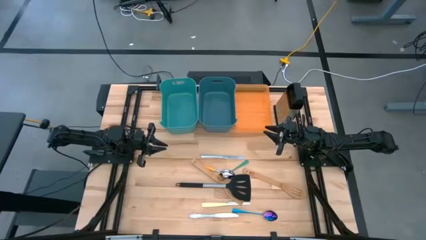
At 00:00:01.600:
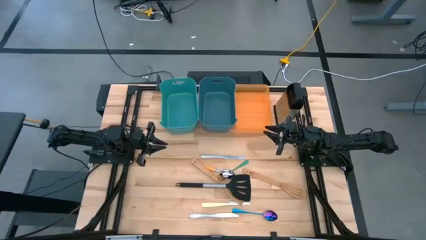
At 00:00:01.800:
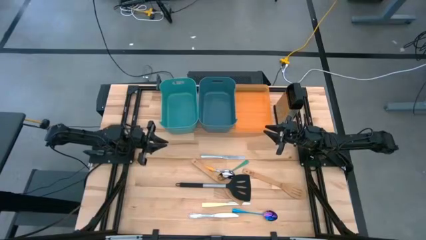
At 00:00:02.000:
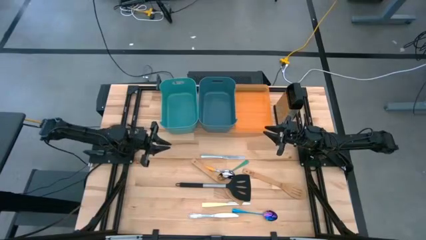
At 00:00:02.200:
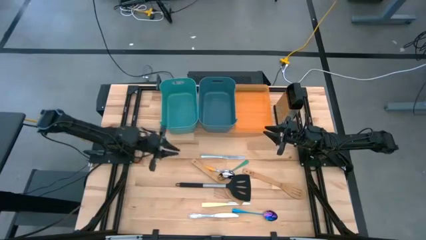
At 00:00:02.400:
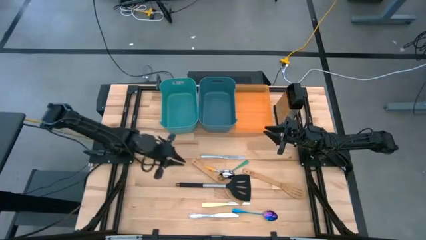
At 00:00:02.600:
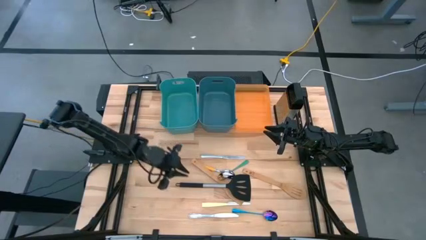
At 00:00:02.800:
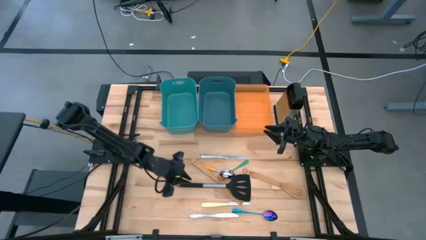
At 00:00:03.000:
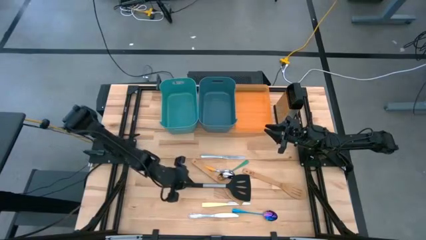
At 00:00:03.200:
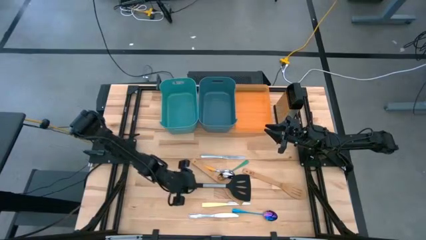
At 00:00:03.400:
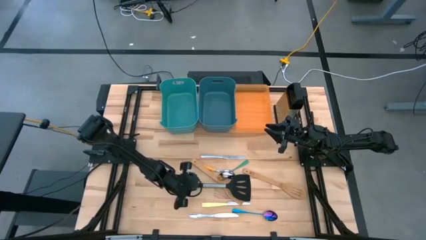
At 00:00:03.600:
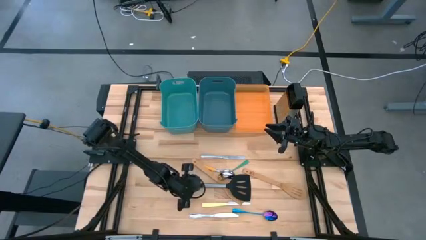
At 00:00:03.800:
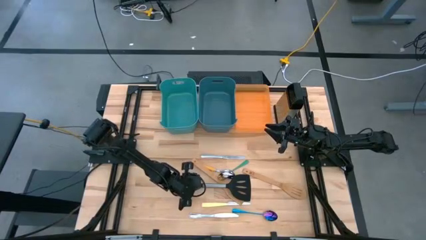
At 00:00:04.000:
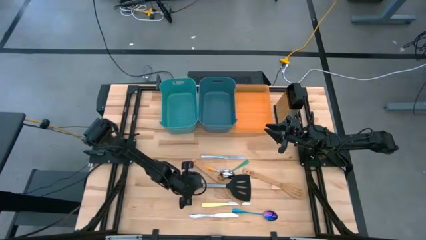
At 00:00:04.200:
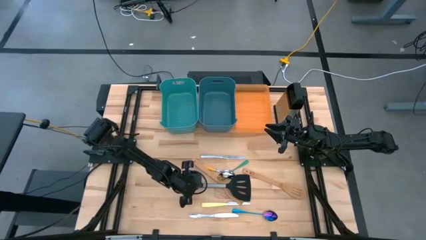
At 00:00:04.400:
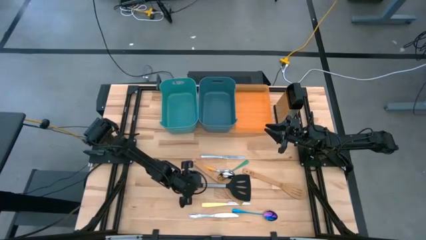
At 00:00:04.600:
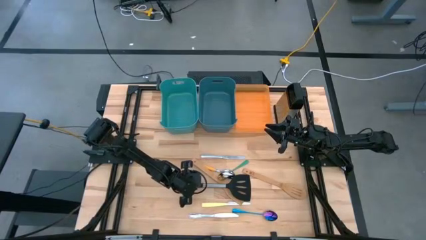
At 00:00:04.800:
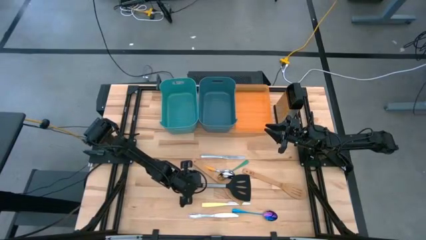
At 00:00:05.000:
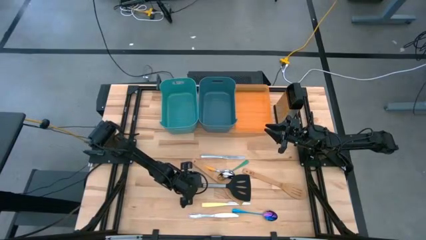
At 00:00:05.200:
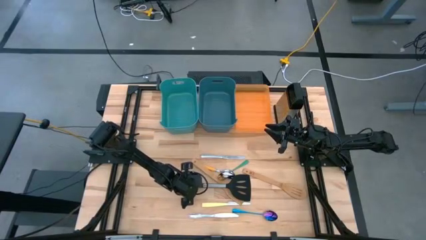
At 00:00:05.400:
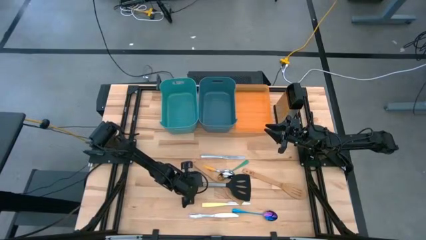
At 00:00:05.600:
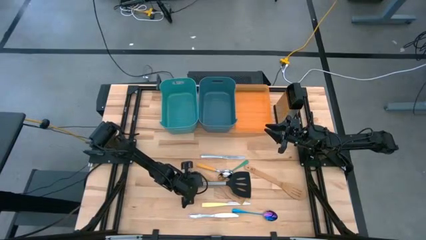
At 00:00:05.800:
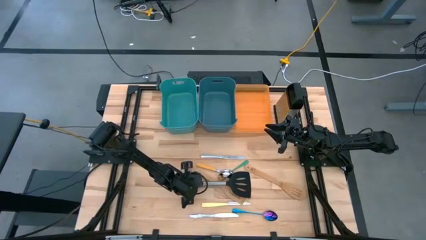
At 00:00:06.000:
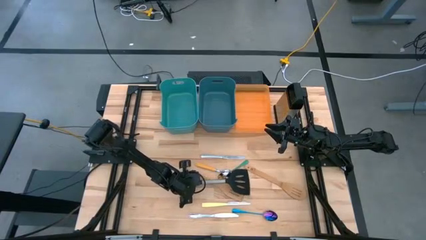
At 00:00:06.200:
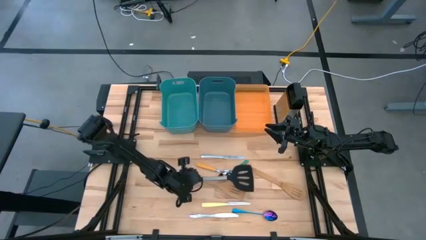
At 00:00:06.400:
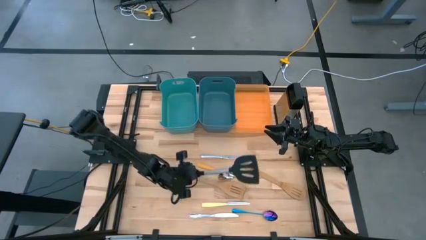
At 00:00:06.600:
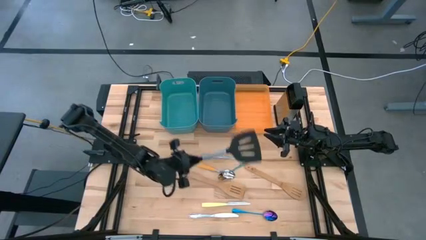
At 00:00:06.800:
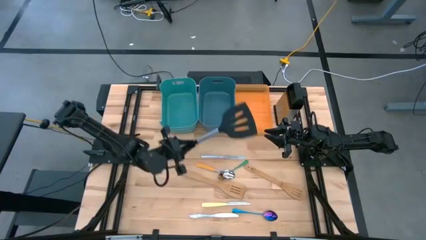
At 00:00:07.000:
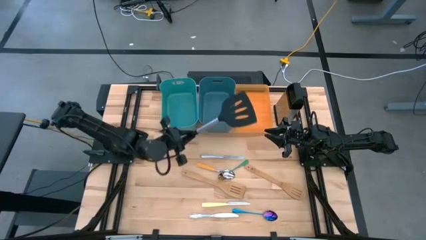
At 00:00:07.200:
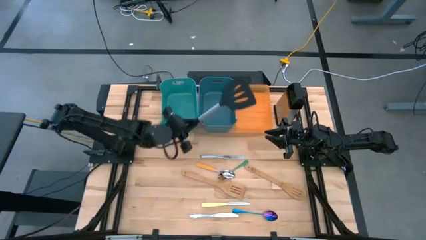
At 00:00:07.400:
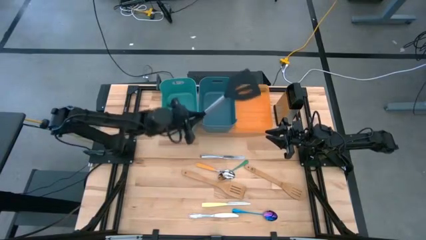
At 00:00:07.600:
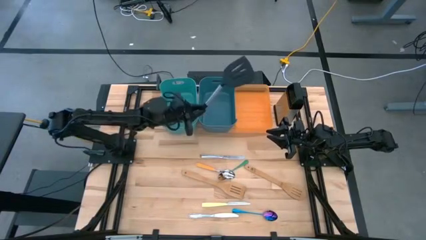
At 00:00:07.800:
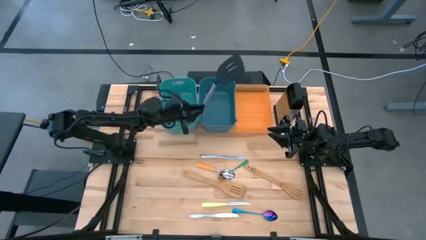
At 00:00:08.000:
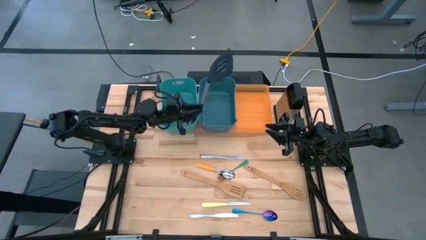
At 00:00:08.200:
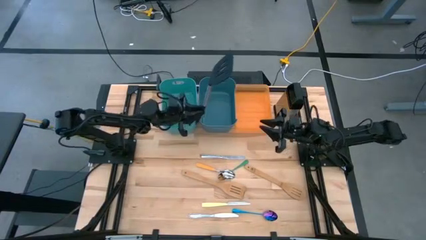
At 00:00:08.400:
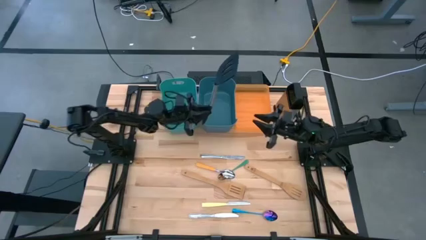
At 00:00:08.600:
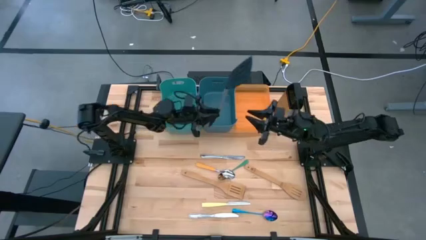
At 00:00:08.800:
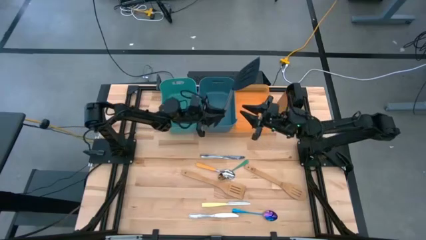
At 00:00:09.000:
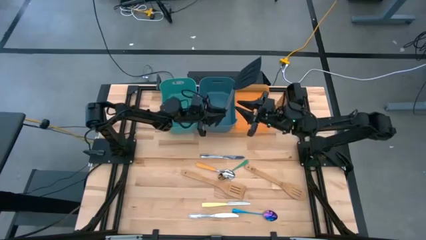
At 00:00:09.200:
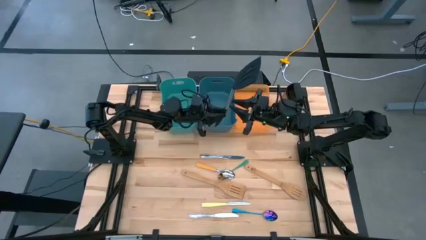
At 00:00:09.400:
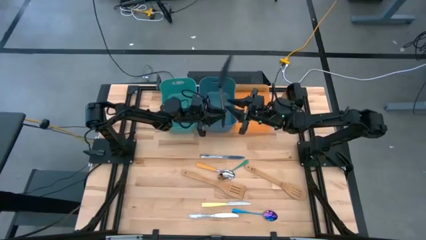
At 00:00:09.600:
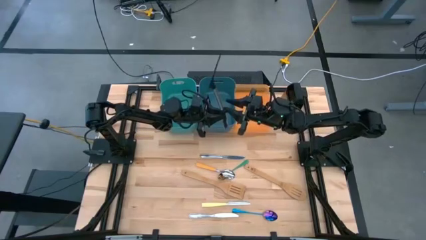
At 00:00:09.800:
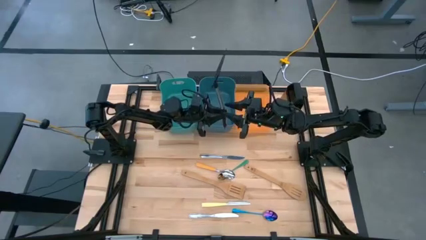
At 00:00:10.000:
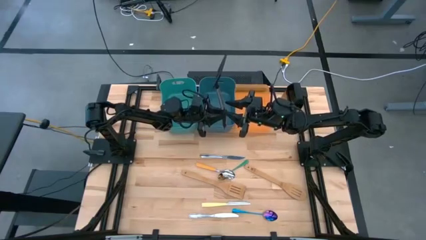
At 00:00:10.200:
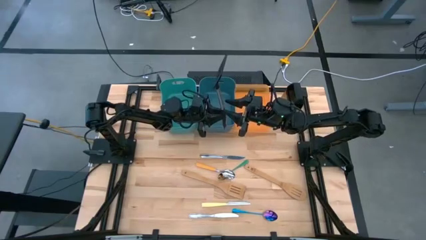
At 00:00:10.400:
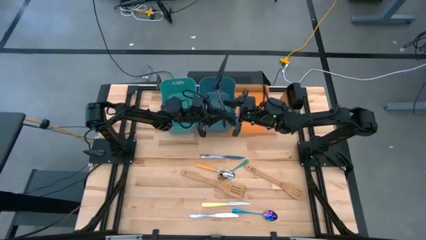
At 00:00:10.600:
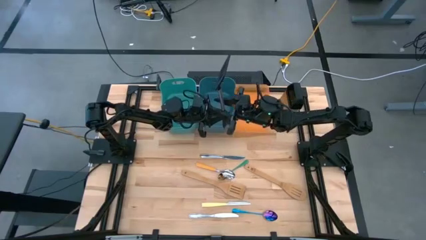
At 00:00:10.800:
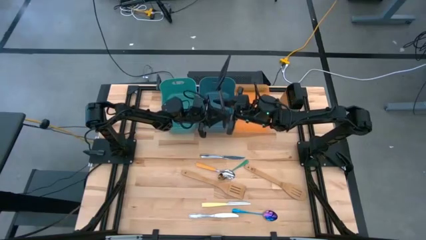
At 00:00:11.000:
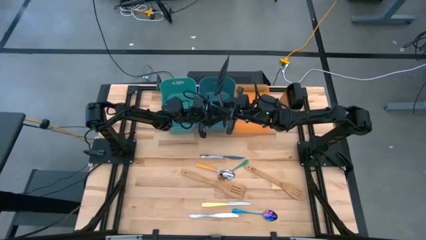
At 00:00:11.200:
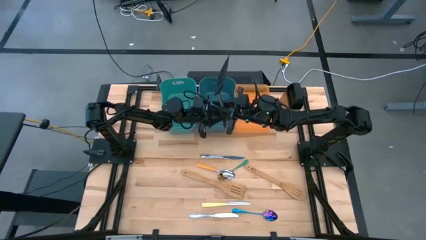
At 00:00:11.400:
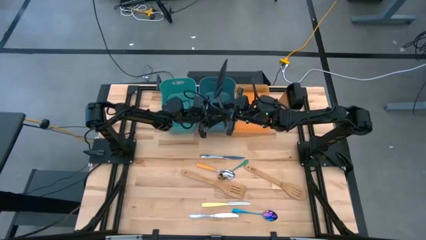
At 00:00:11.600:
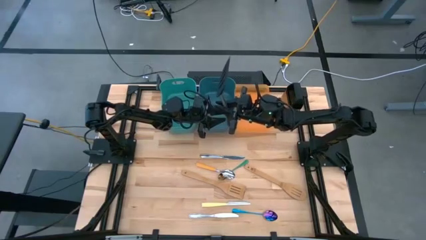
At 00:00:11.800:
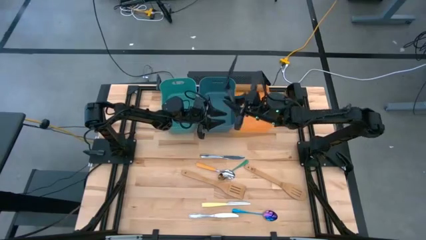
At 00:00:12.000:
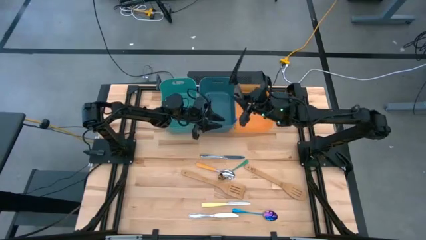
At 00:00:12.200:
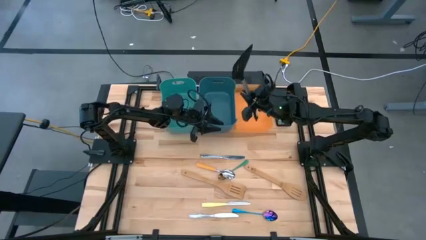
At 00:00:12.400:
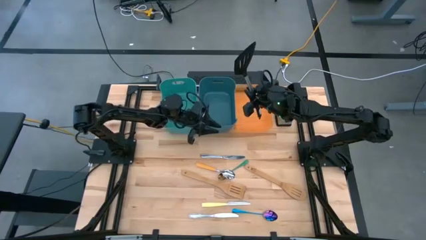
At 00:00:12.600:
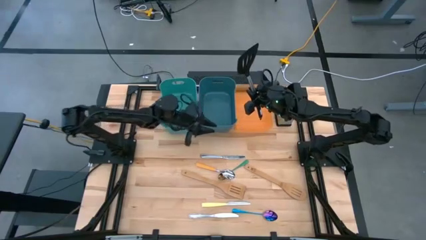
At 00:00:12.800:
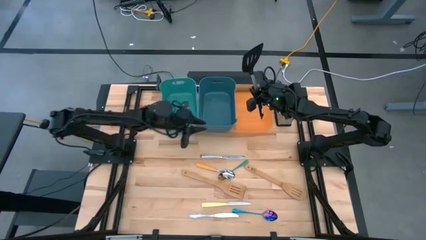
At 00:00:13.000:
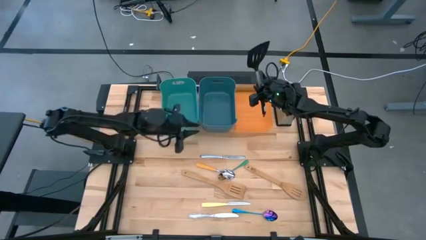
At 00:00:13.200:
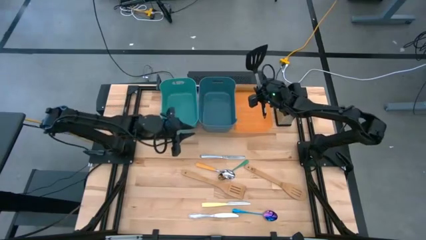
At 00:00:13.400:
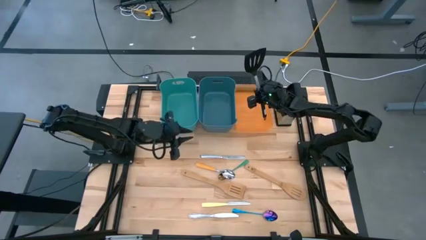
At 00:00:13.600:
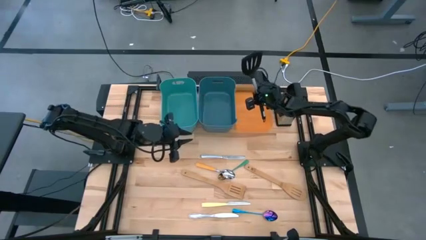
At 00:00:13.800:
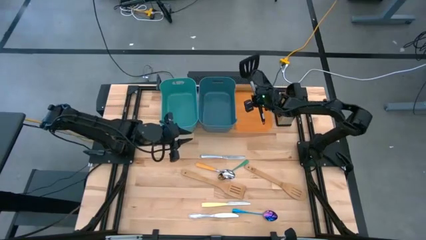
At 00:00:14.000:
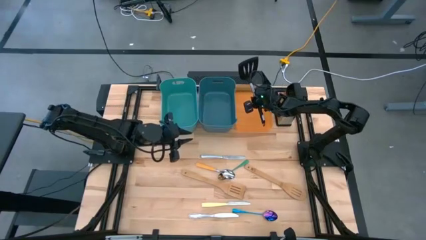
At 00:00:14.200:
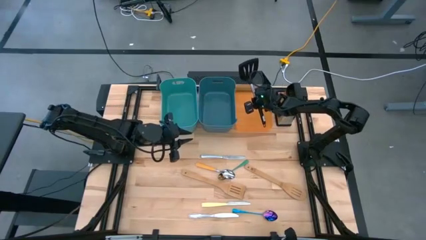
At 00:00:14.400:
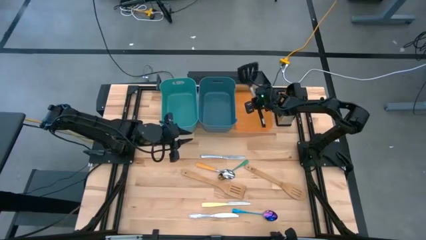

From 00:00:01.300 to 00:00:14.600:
Task: Pick & Place Kitchen Items
Put the black slotted spatula into the orange bin

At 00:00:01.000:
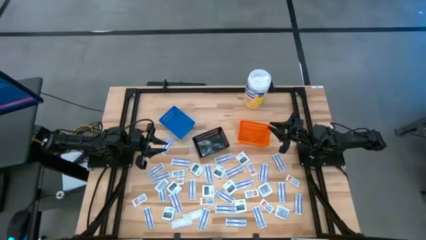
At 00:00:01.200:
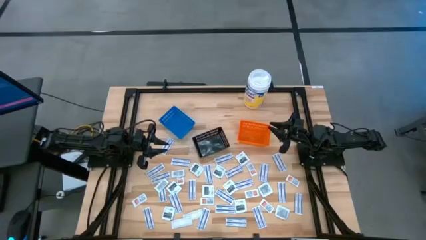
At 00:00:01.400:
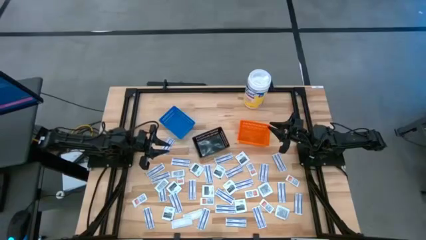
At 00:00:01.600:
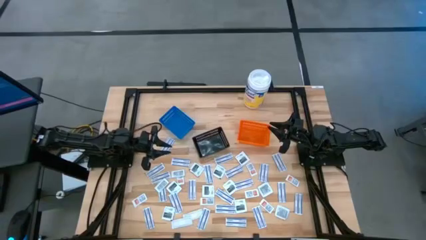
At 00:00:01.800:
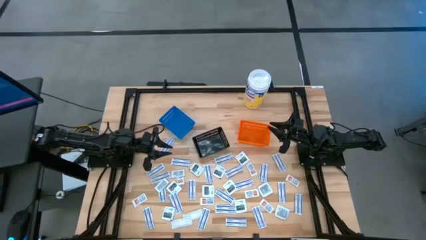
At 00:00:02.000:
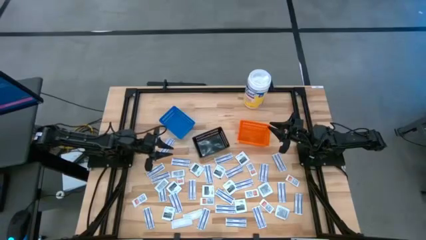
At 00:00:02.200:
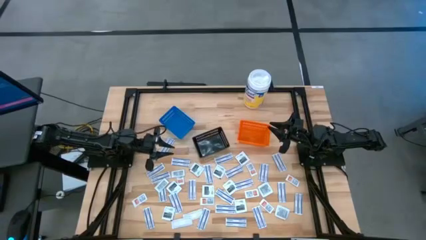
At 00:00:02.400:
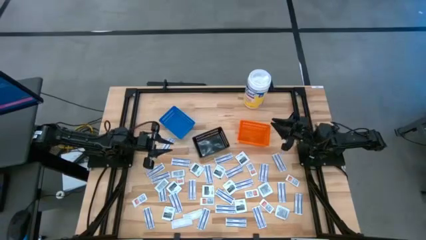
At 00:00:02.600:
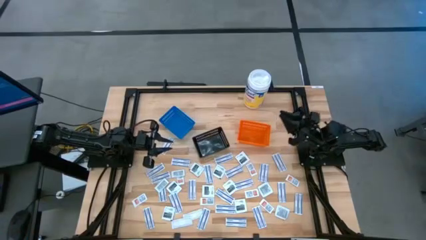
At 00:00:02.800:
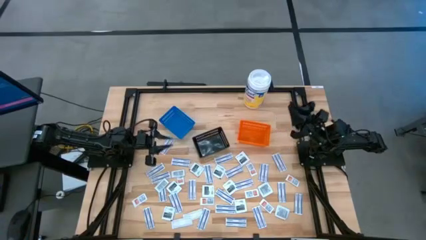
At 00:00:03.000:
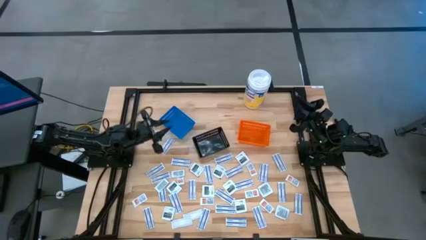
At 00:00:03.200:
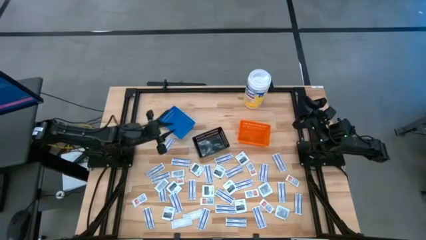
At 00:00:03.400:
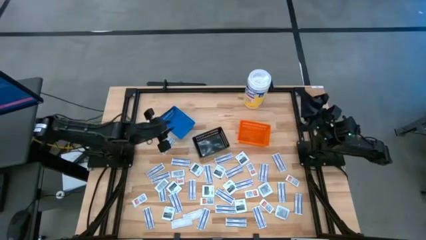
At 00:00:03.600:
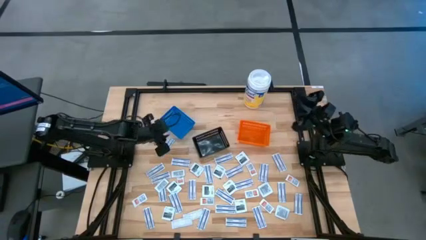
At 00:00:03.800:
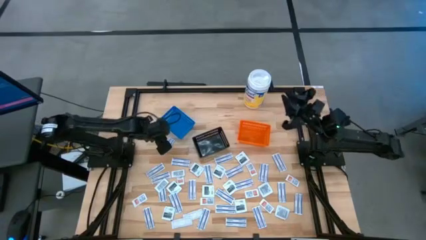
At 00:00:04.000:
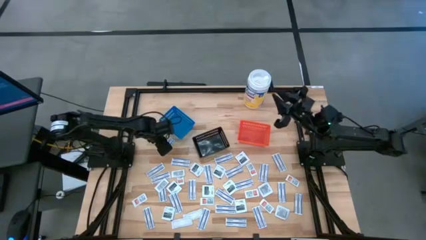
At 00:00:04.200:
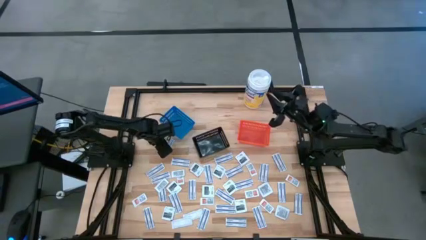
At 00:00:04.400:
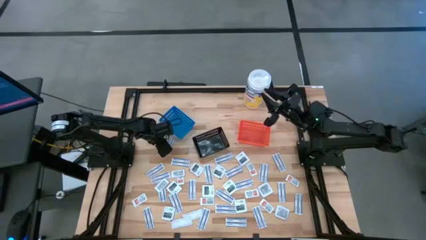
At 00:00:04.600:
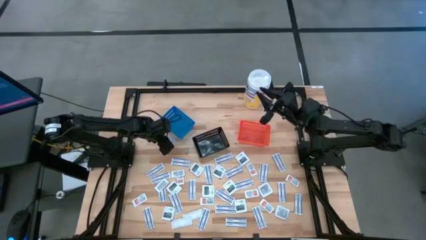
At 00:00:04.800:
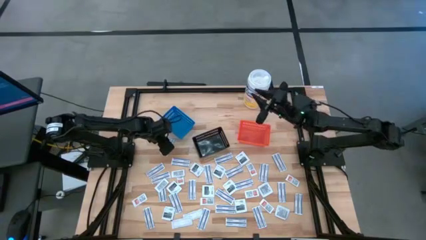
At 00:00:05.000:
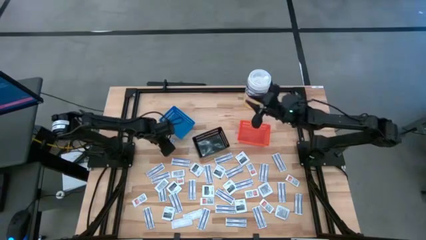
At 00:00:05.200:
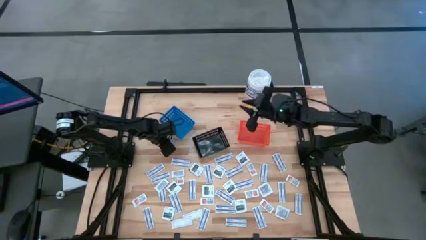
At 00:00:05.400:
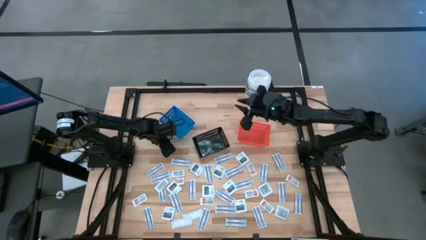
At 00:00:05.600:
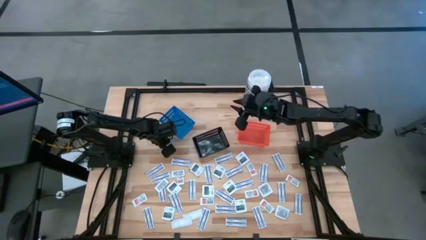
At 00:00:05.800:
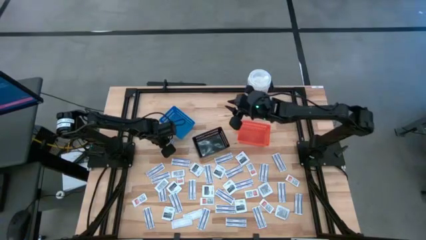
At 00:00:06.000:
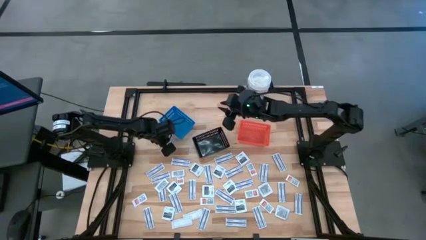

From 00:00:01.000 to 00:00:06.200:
Task: Pick & Place First Aid Supplies
Put the bandage into the blue container
